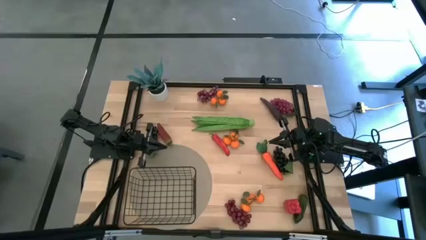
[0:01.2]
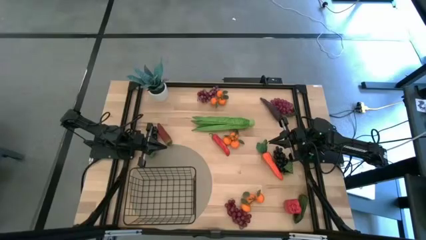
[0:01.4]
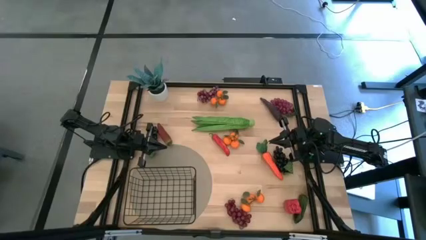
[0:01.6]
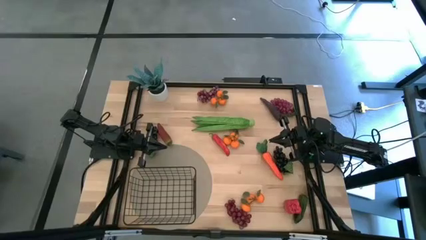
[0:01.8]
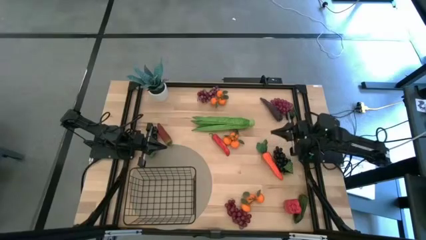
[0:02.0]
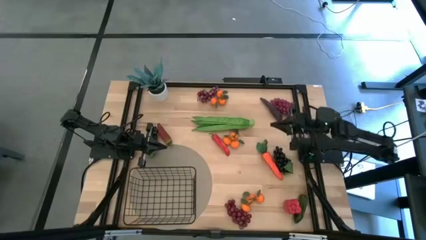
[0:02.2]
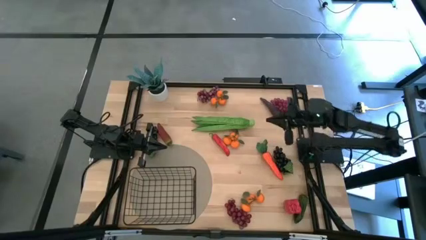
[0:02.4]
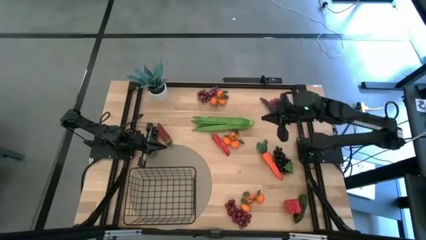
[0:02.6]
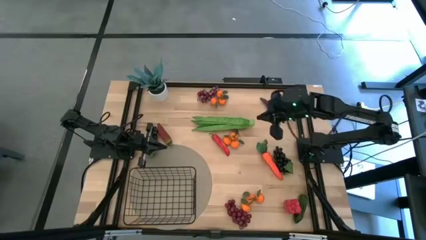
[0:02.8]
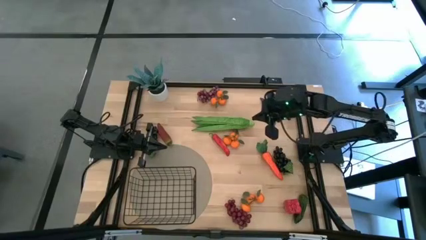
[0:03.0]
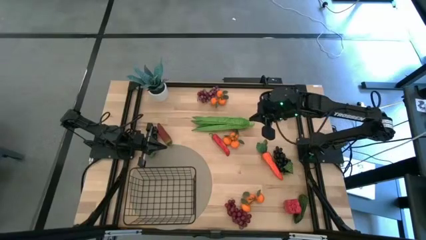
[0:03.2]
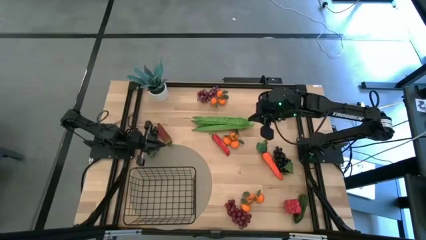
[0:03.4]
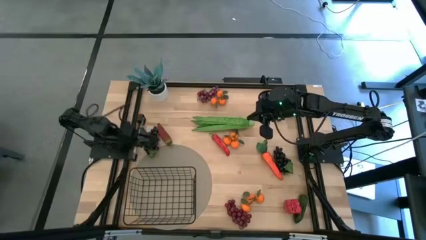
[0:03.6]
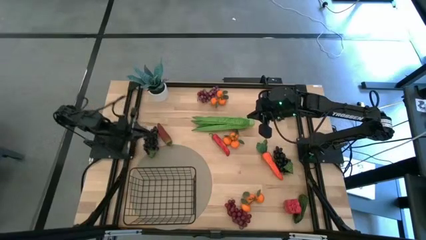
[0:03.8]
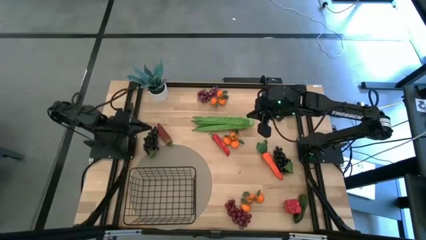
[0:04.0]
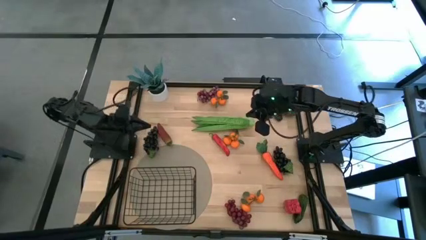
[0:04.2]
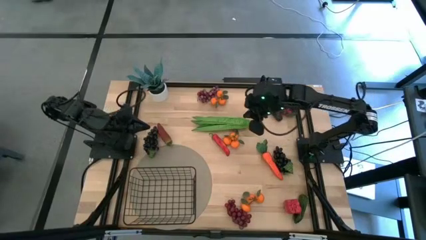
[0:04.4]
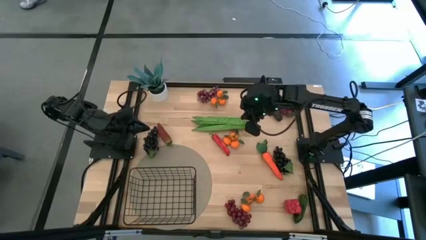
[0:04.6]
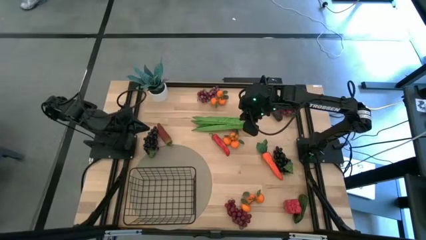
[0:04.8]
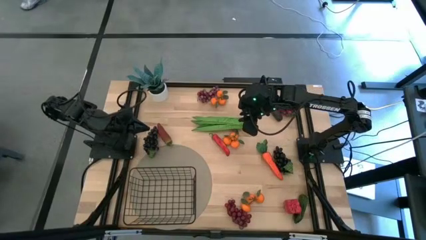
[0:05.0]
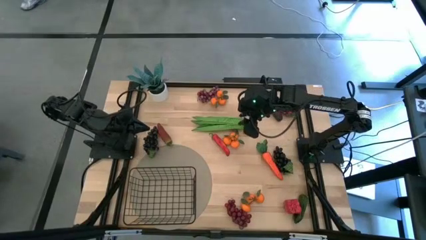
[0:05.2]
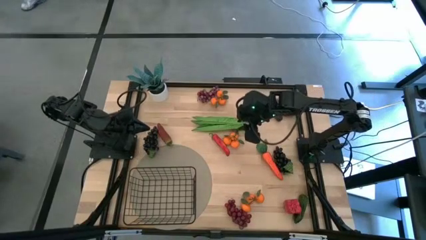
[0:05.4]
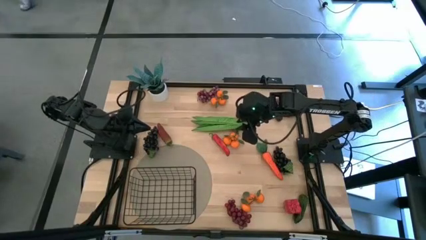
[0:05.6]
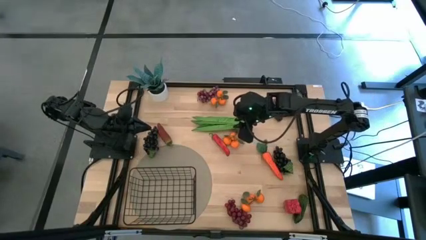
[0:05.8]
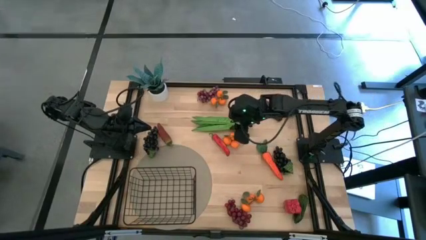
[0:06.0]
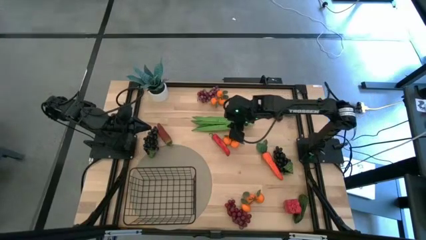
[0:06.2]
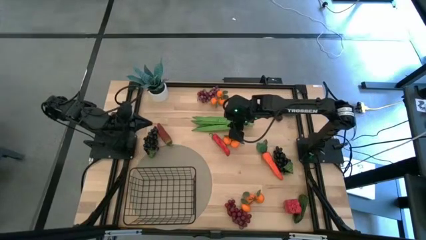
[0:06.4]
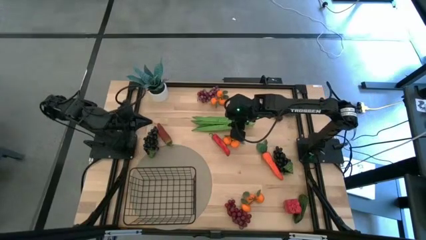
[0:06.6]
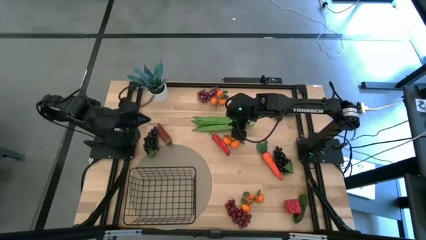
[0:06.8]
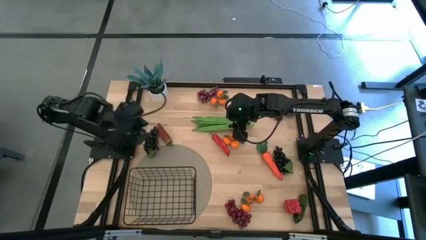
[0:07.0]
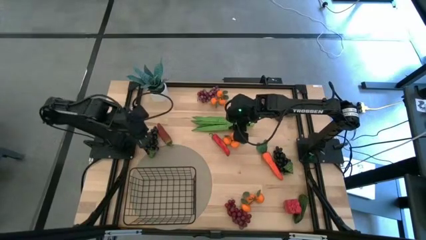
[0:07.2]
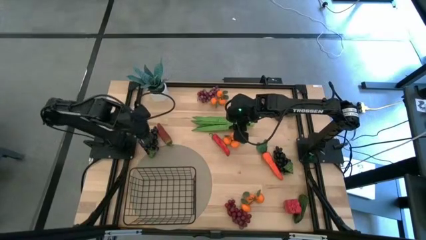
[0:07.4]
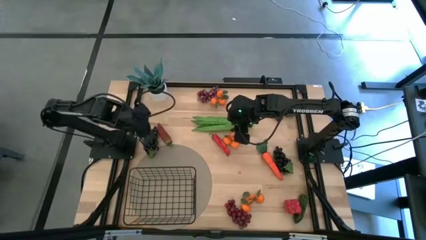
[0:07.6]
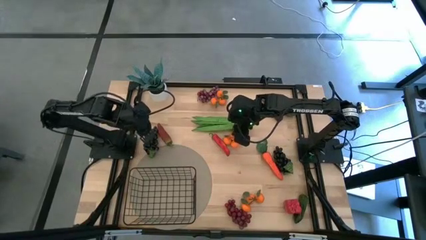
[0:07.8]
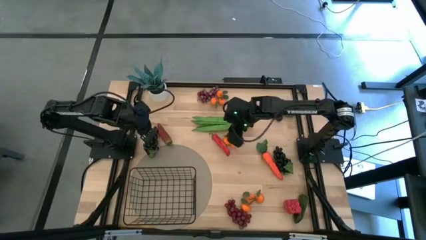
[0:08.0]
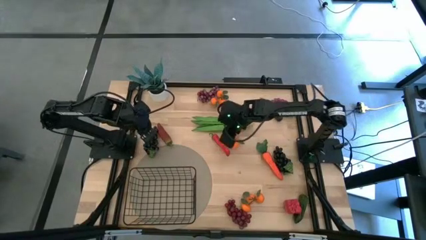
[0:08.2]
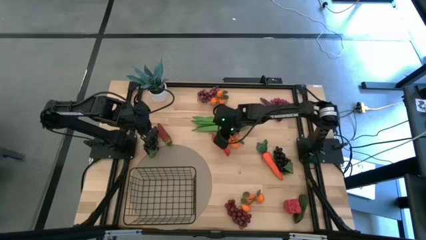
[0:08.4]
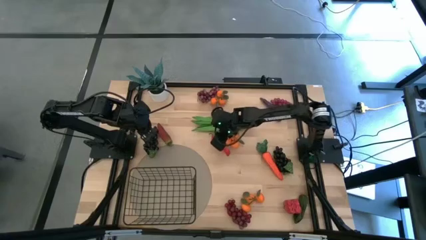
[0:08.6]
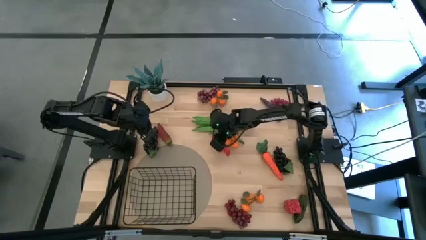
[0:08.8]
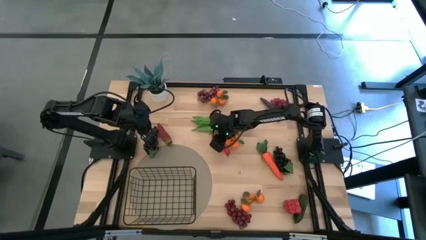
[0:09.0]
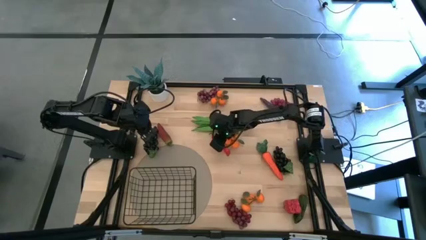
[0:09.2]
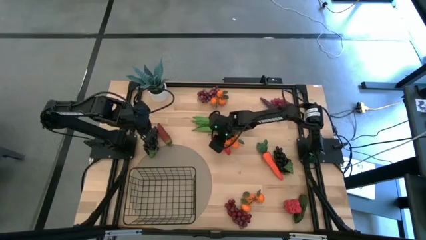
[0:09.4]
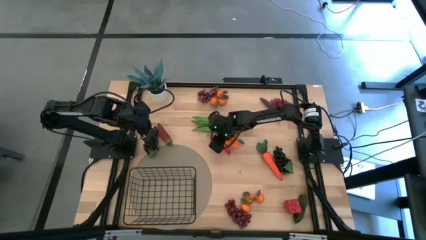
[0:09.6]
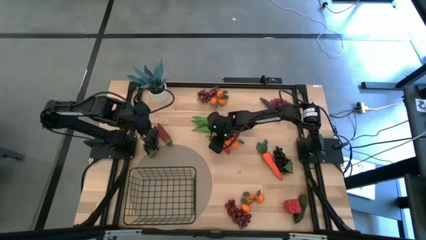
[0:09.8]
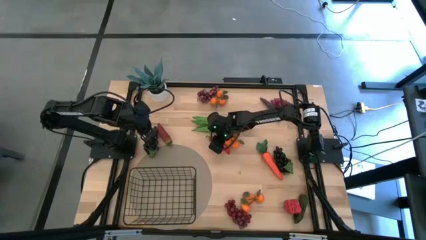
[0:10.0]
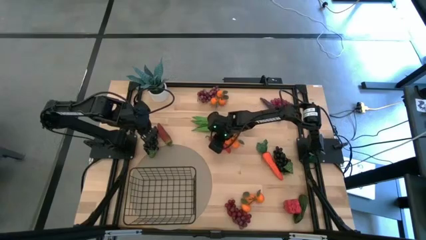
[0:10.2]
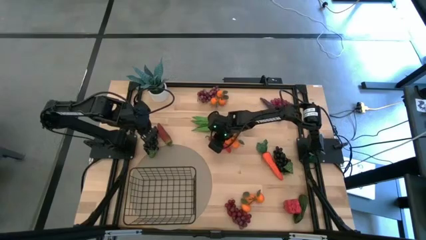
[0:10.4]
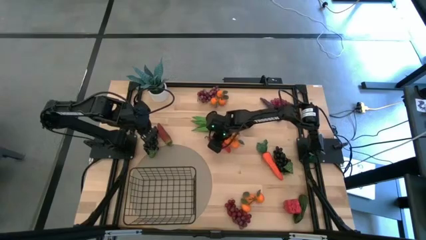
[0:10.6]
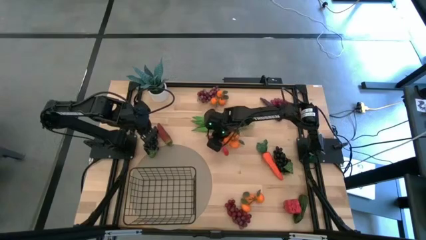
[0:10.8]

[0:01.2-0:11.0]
Task: Build produce basket
Put the red chilli pepper into the wire basket

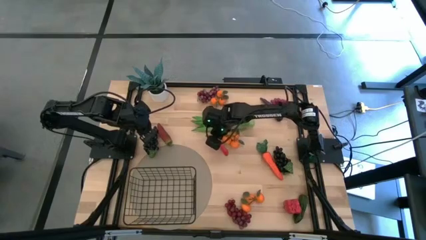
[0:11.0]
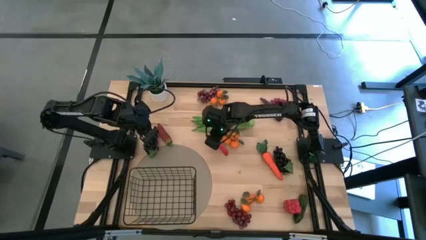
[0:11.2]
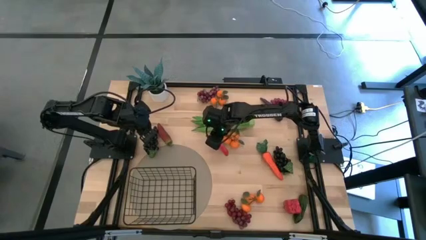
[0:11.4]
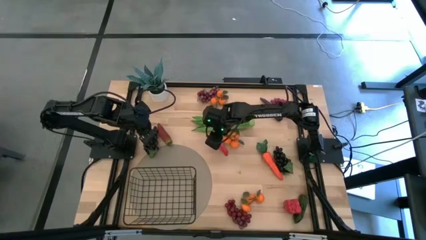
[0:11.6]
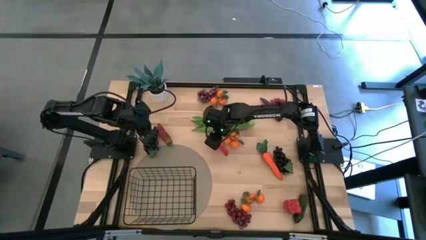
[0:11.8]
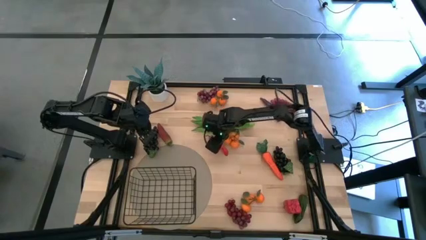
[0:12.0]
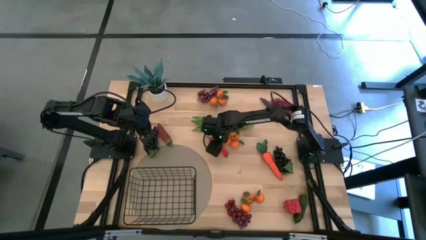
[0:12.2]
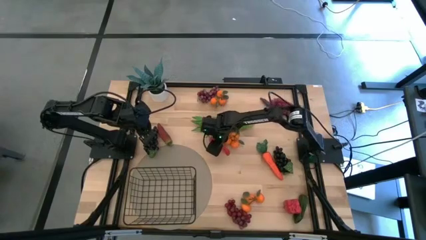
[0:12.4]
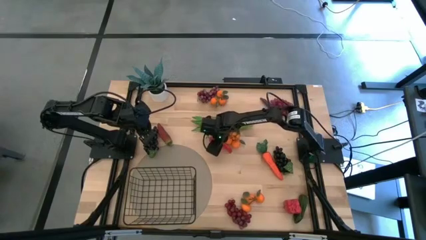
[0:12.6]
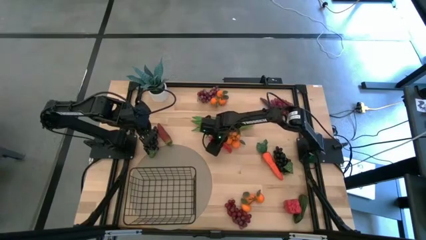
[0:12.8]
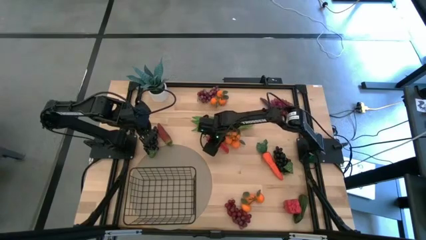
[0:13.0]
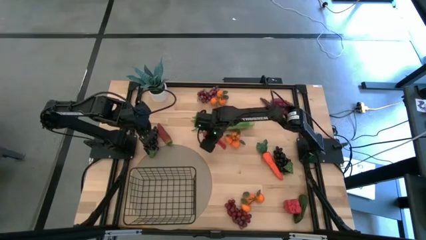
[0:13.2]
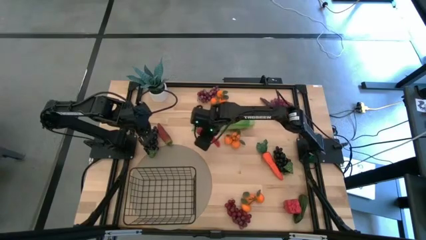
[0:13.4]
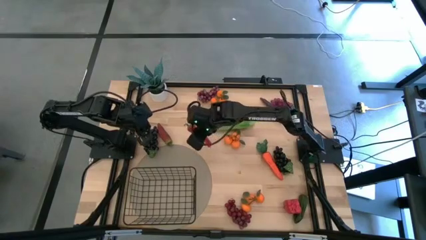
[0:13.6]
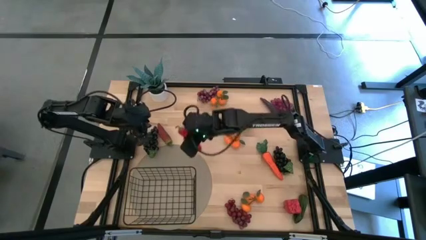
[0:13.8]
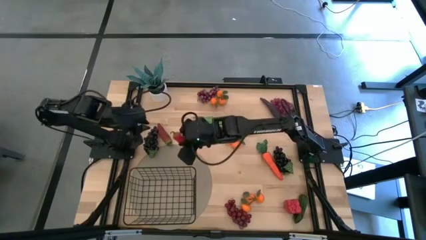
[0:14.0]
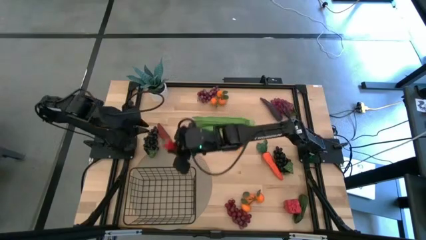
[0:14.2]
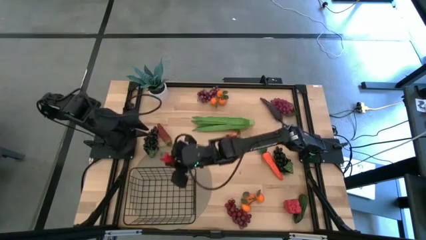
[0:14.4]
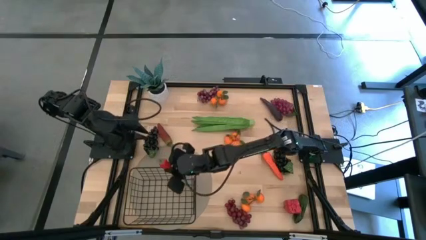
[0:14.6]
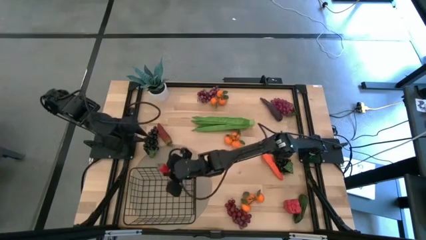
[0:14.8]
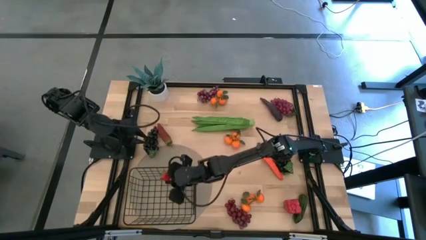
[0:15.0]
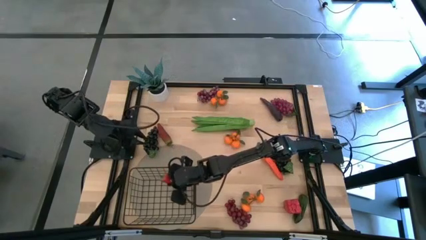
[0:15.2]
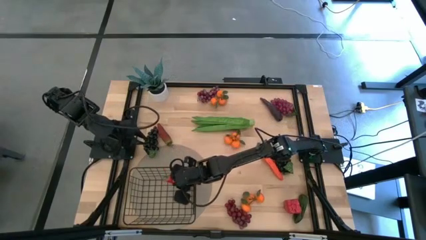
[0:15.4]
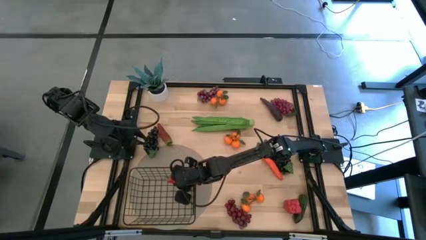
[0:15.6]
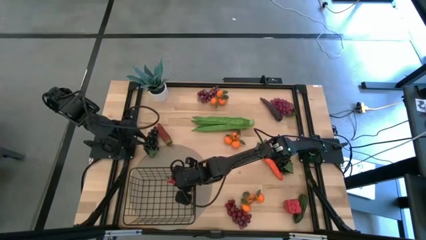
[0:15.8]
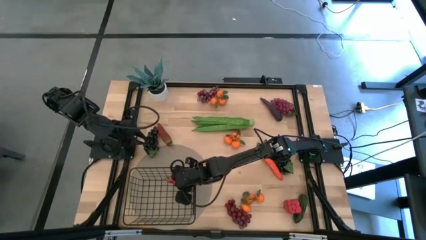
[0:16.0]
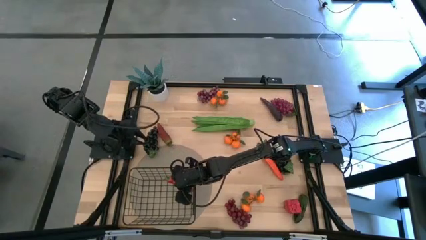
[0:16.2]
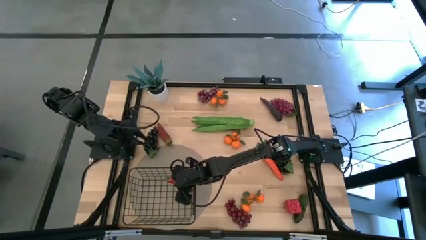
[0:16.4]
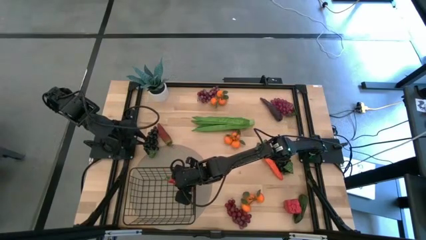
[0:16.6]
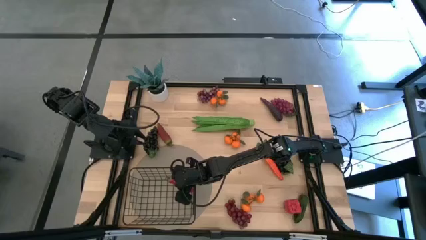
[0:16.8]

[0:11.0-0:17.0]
Put the red chilli pepper into the wire basket
